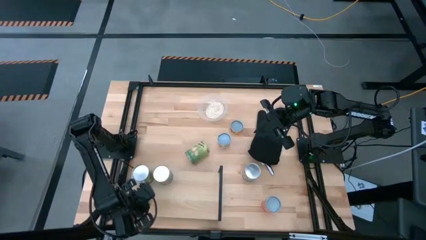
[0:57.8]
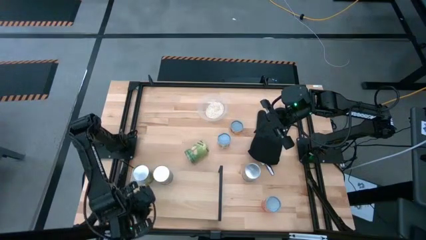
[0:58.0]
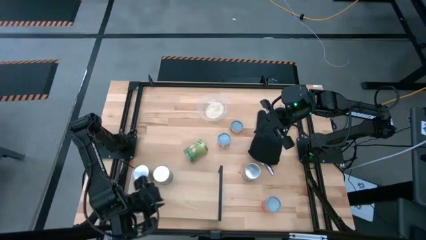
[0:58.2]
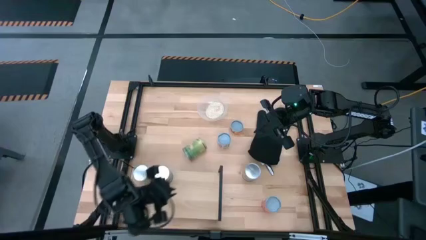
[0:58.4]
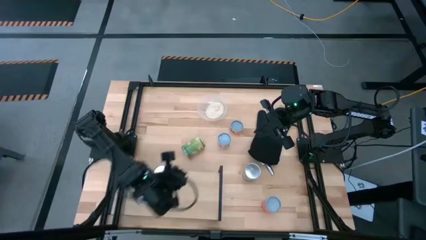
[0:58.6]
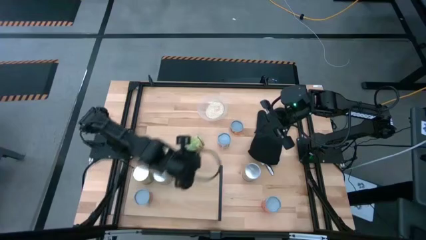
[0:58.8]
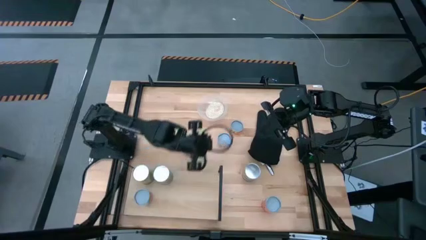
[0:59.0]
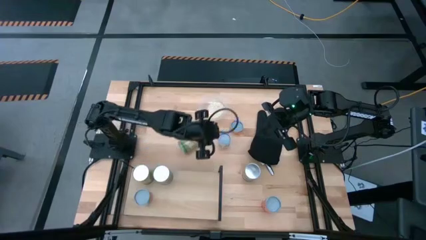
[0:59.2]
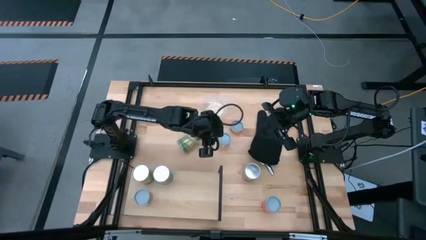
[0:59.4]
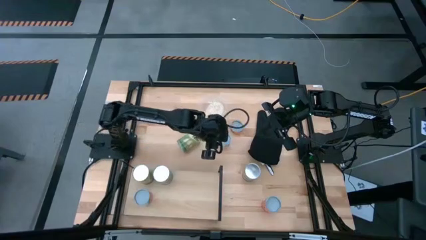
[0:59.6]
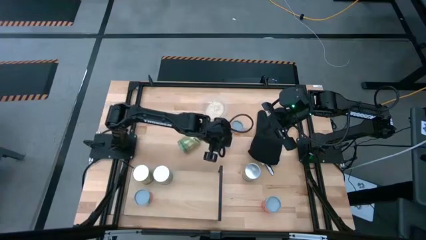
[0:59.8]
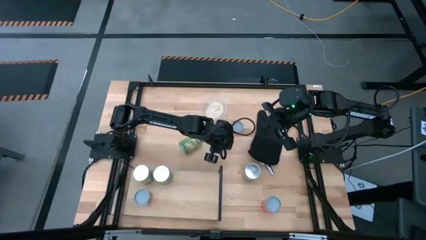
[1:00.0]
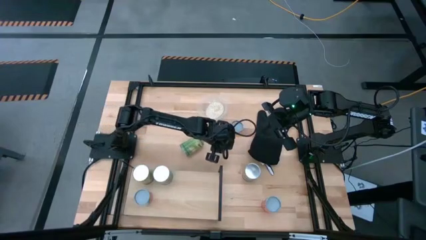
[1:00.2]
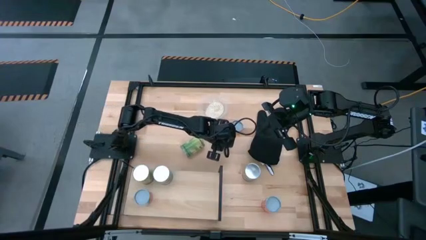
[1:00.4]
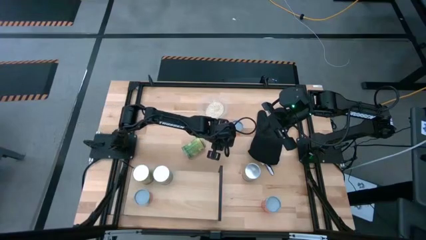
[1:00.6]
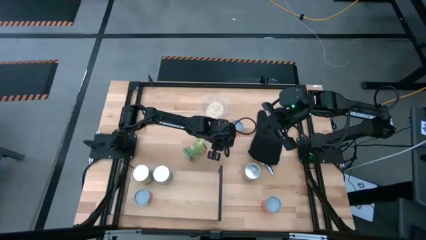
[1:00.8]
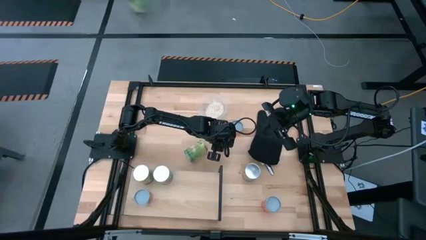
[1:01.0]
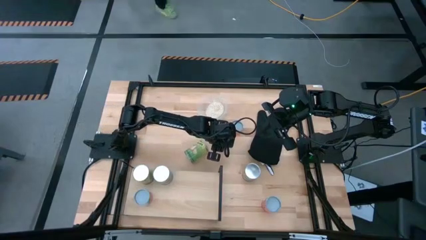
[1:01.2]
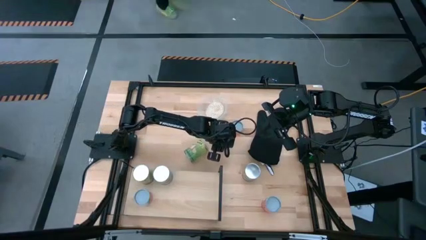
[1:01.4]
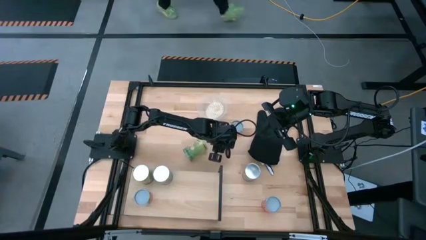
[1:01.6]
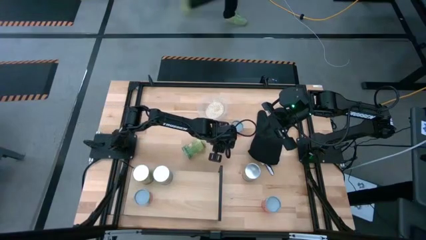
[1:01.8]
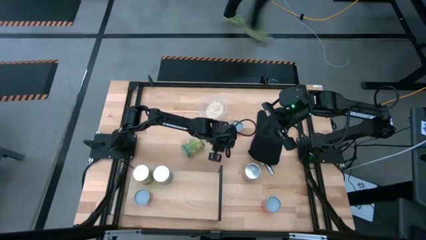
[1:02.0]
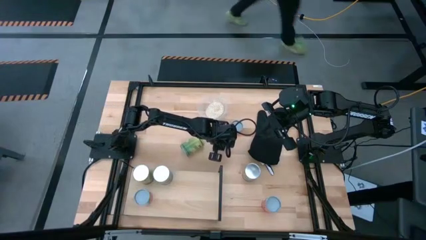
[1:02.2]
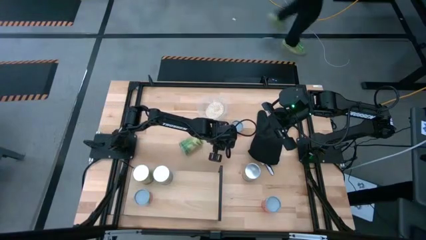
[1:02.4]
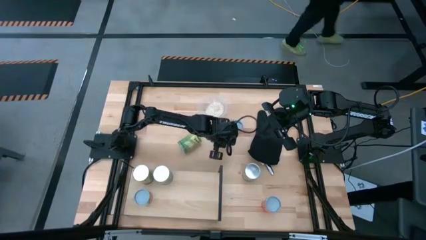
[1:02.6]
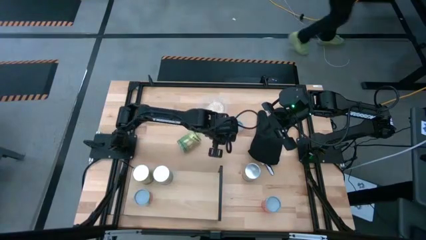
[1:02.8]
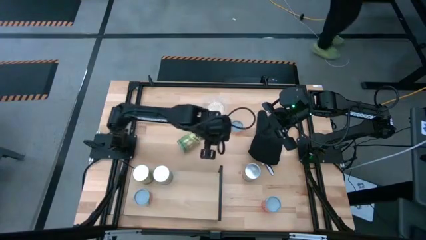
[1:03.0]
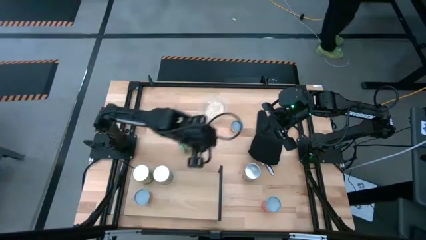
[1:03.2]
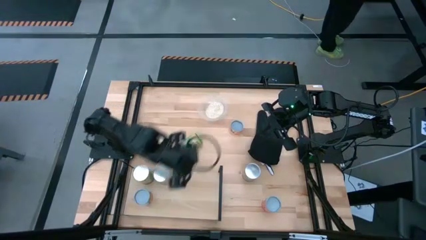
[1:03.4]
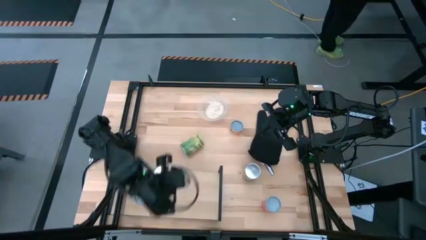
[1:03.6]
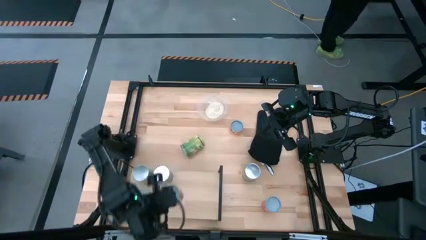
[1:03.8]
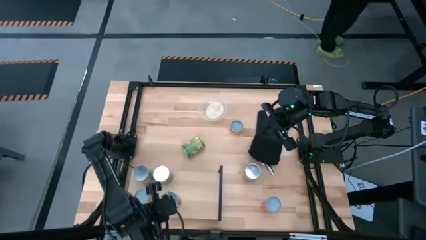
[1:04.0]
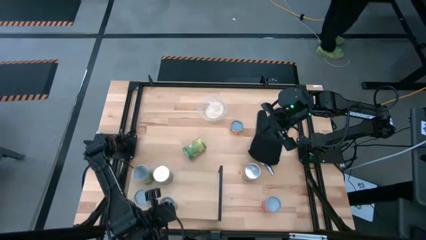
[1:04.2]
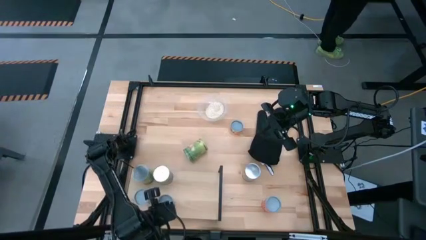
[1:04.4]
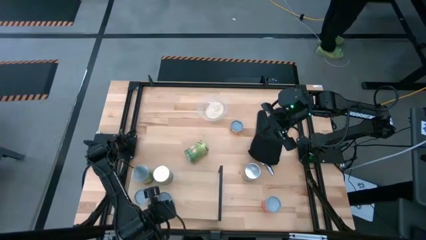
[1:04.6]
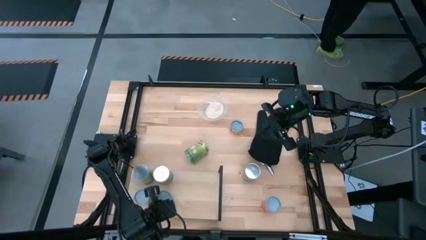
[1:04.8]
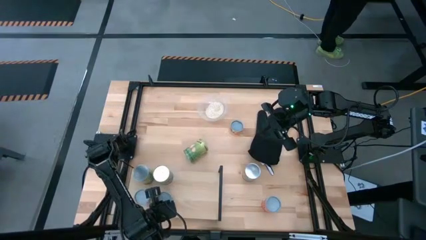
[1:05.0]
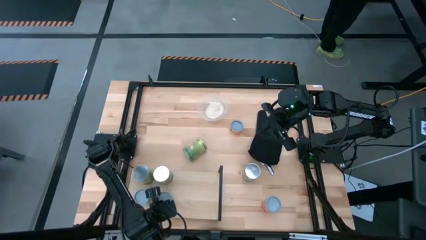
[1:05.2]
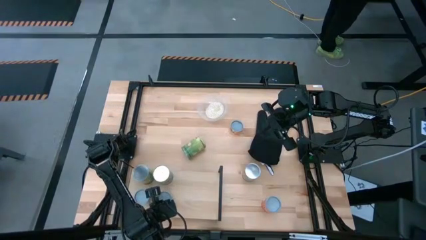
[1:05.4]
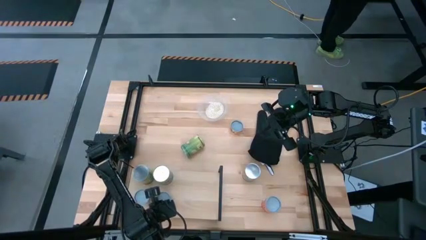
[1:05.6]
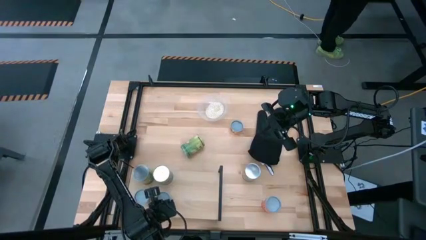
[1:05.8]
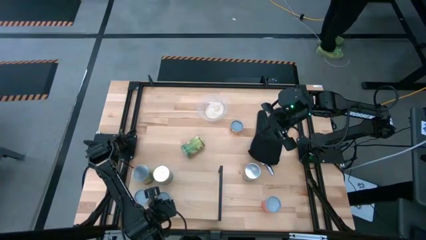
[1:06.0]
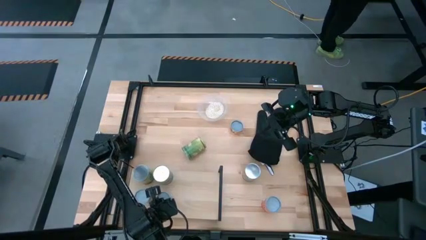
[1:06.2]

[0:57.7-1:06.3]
Task: Pick and place cans onto a shelf
Put the red canned tomato on the shelf aligned with the other blue canned orange
